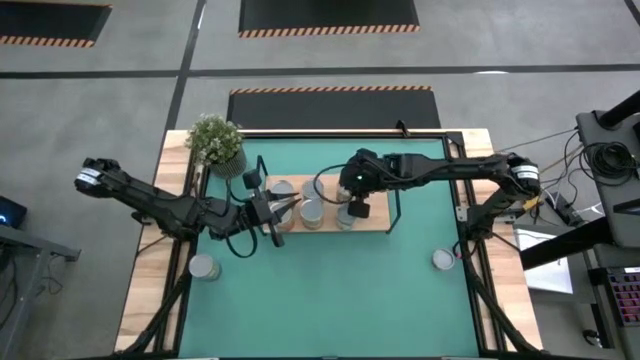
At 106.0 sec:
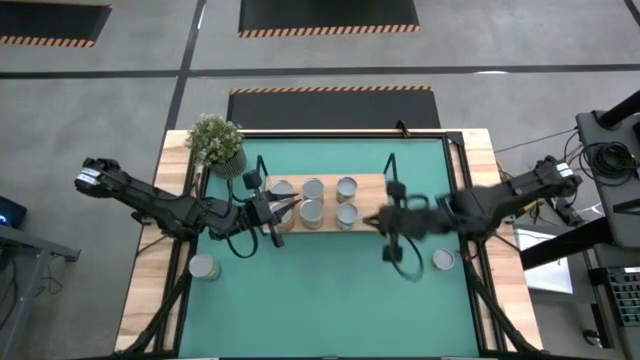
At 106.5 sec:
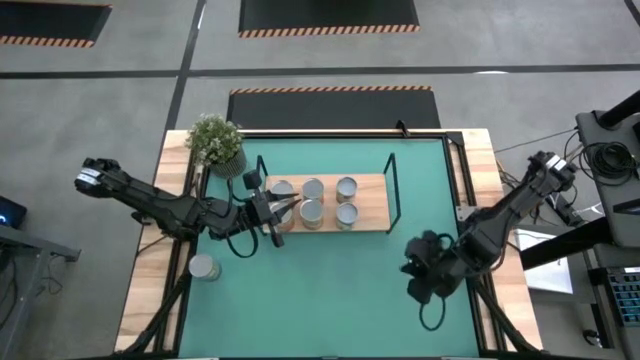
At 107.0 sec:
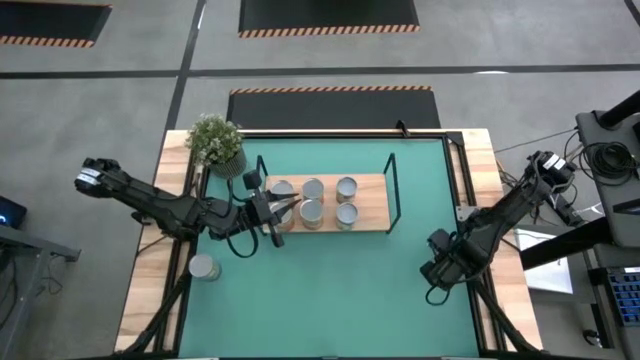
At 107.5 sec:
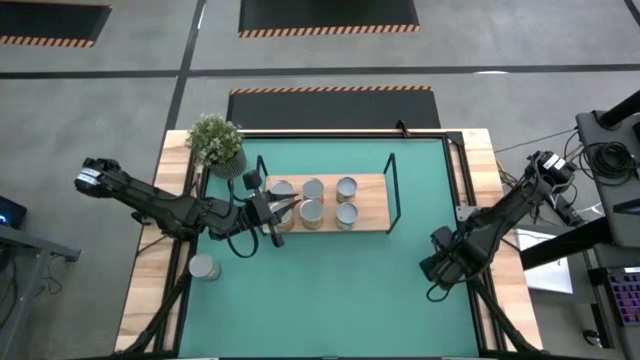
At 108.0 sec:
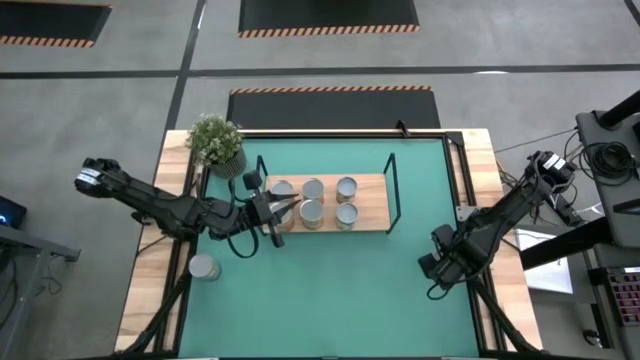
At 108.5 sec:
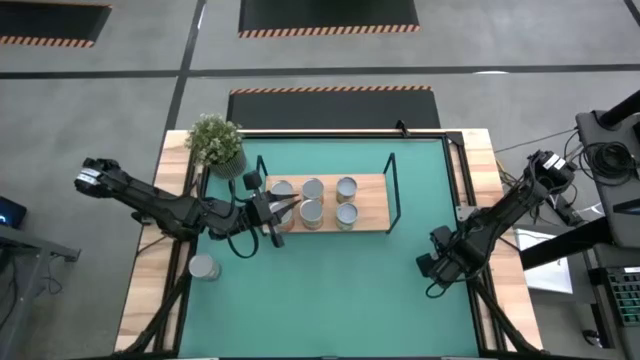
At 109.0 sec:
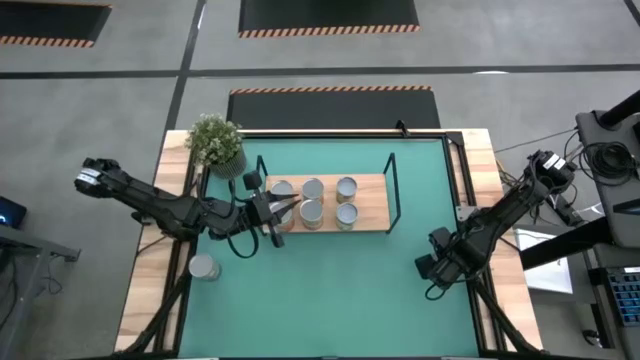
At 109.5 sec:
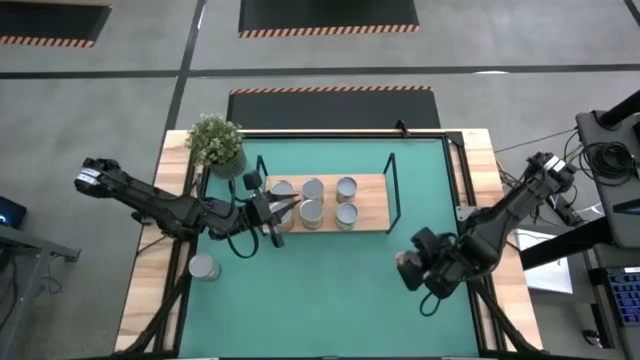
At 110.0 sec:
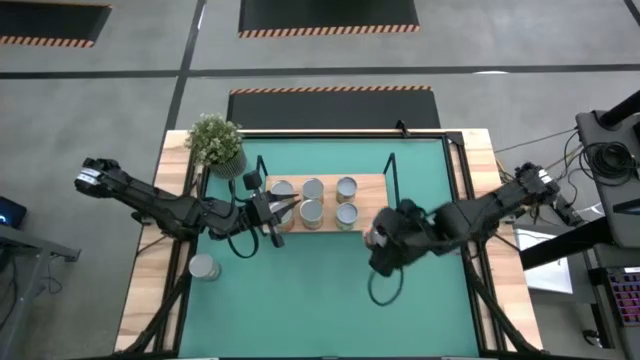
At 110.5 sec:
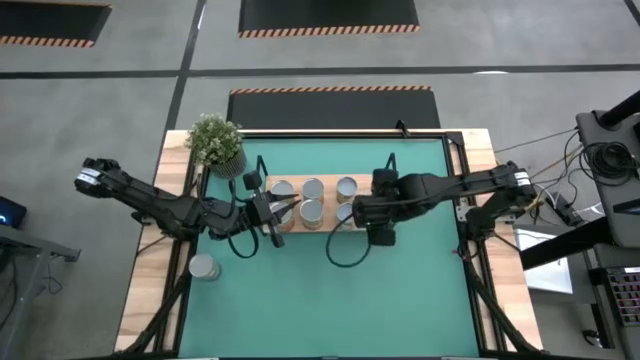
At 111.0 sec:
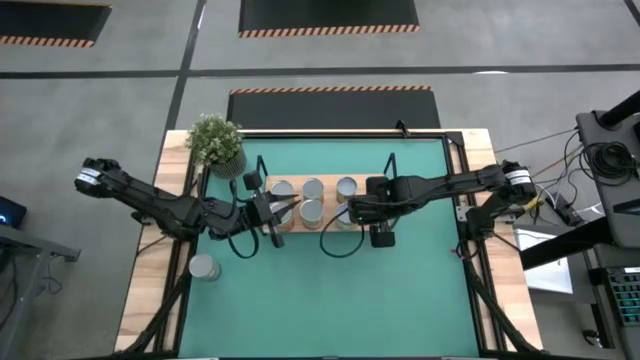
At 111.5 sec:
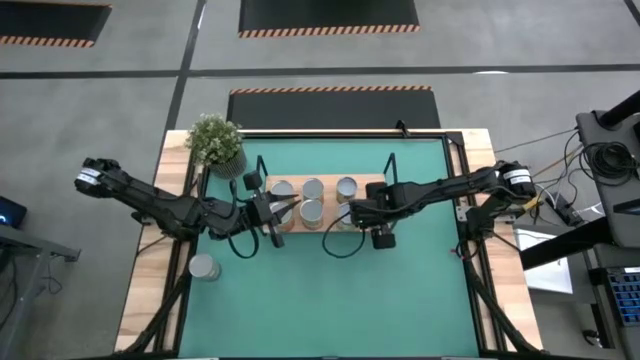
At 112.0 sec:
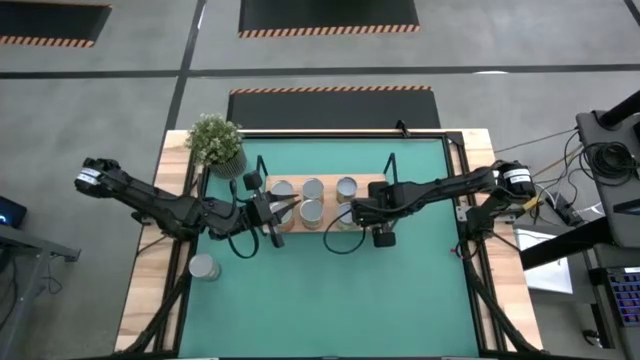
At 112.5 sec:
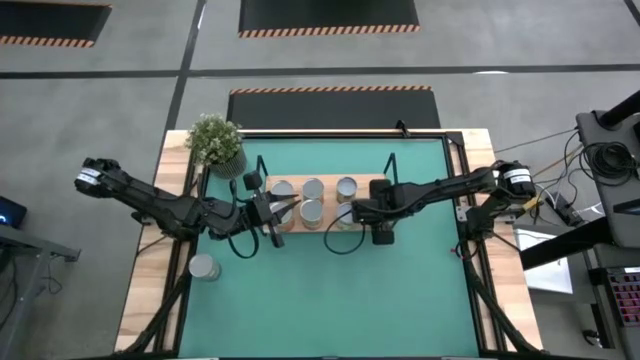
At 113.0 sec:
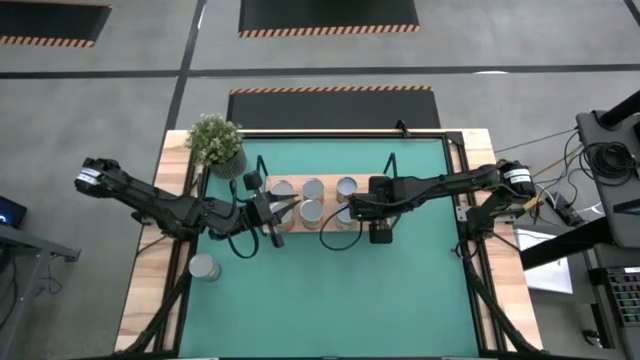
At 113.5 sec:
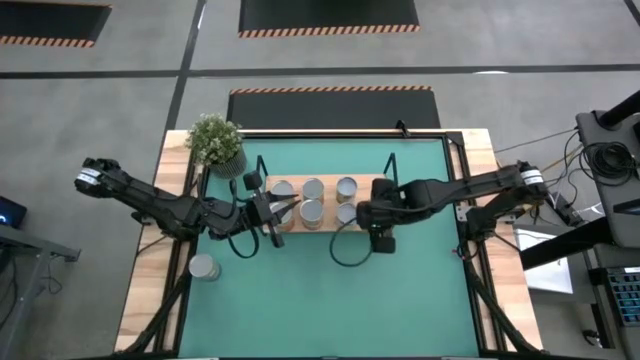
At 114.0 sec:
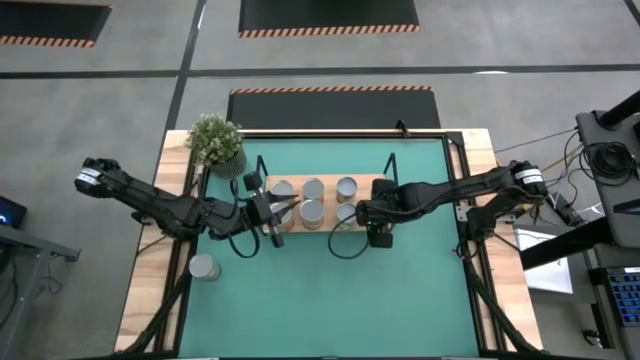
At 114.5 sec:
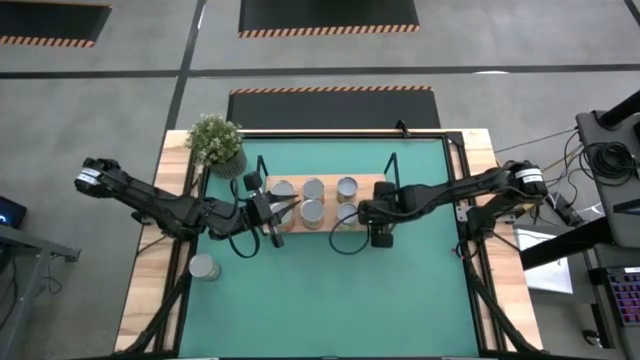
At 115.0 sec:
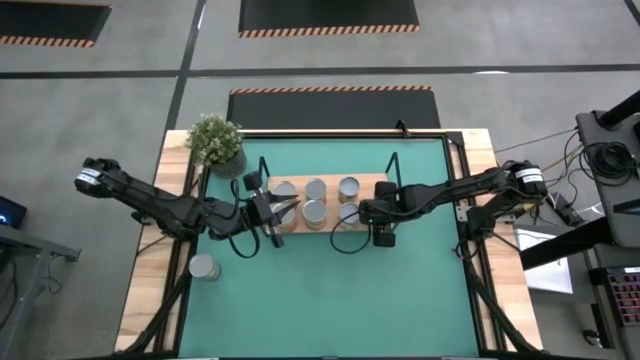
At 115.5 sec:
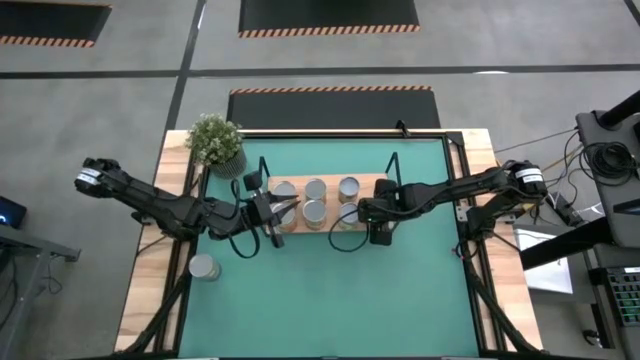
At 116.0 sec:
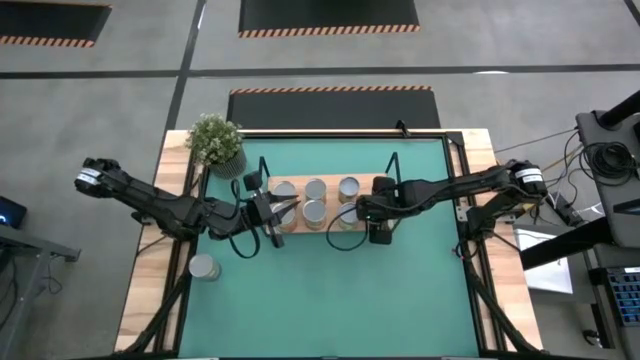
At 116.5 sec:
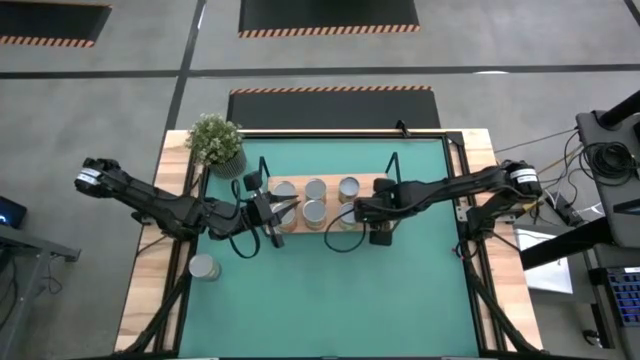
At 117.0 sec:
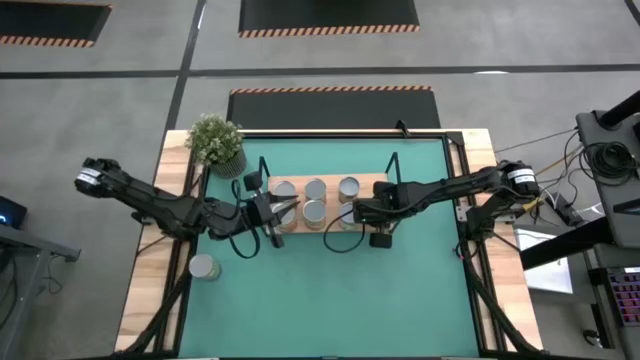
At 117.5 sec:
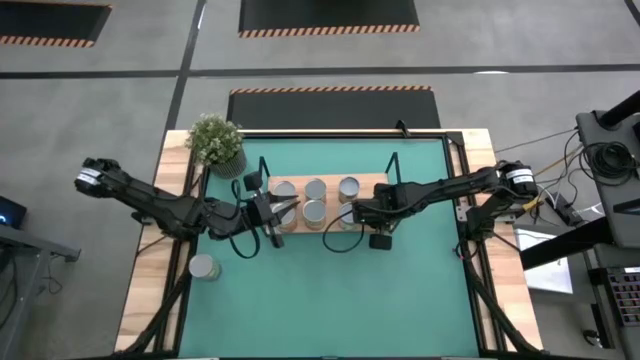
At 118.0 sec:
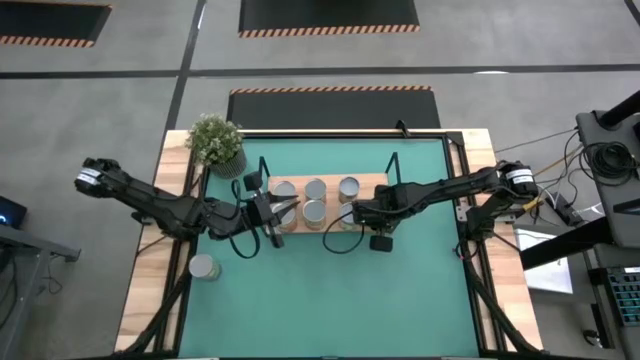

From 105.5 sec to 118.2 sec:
Task: Pick and place cans onto a shelf
Put the canned pineapple rings on the shelf

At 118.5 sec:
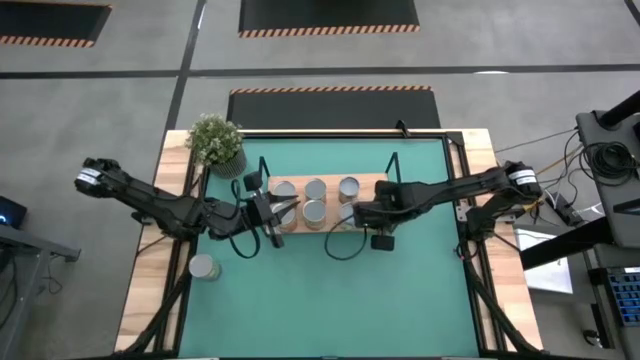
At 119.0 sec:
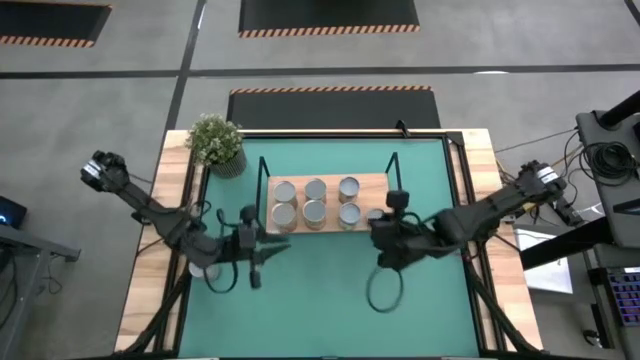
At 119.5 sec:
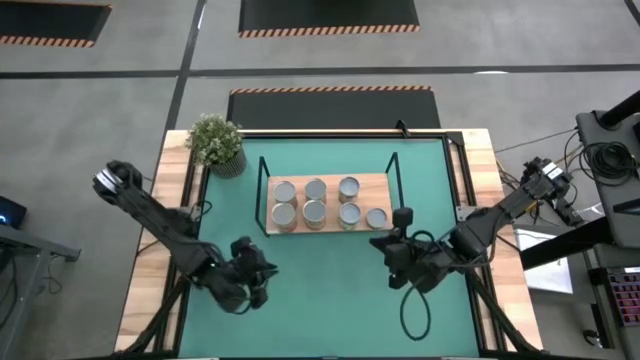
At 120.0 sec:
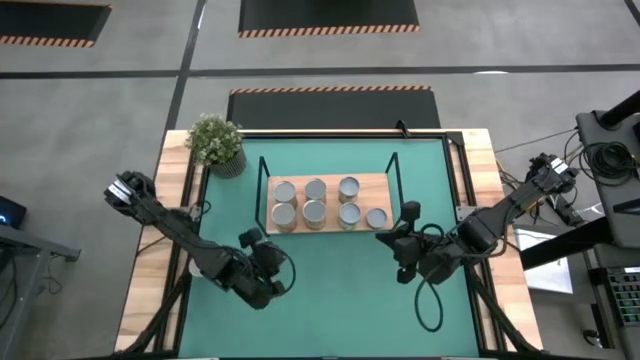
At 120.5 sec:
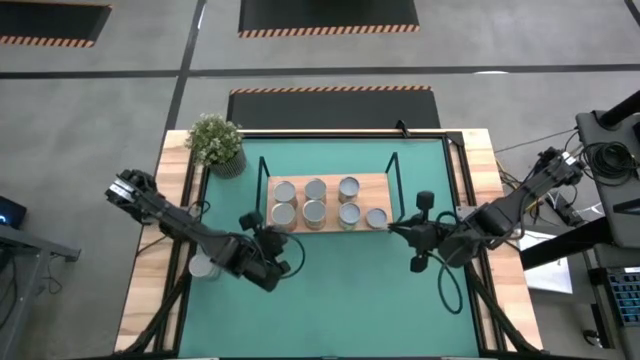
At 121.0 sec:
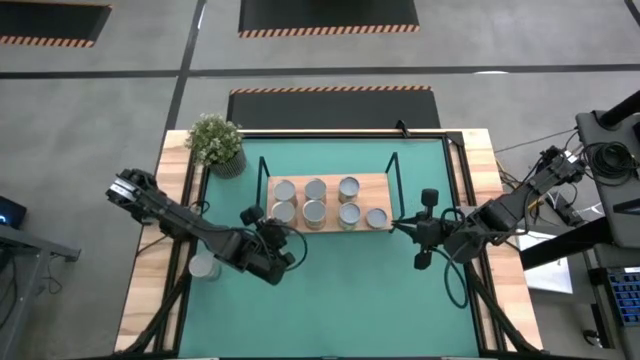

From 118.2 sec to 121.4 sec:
Adjust the cans on the shelf

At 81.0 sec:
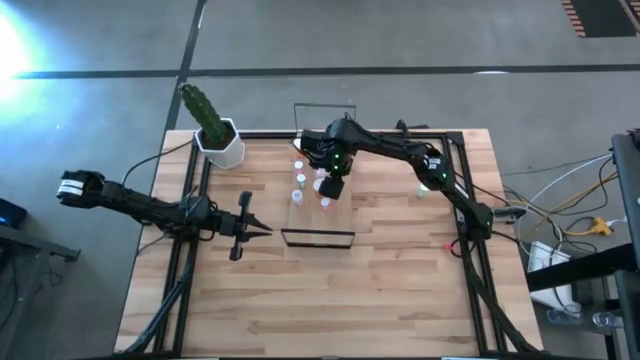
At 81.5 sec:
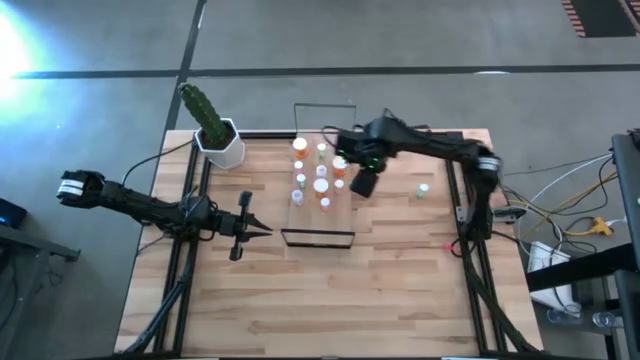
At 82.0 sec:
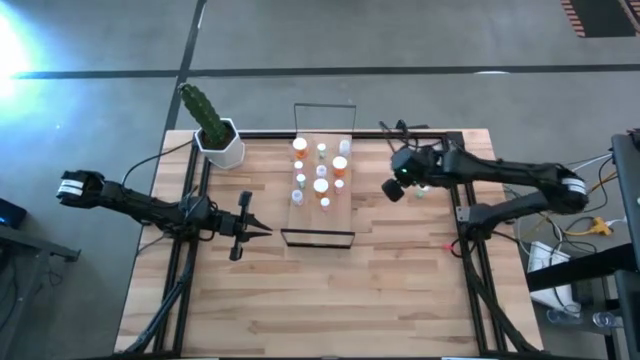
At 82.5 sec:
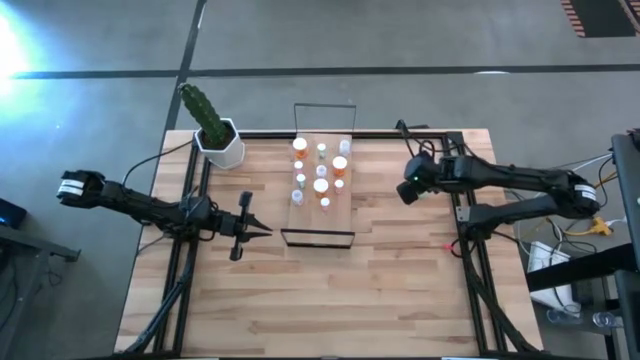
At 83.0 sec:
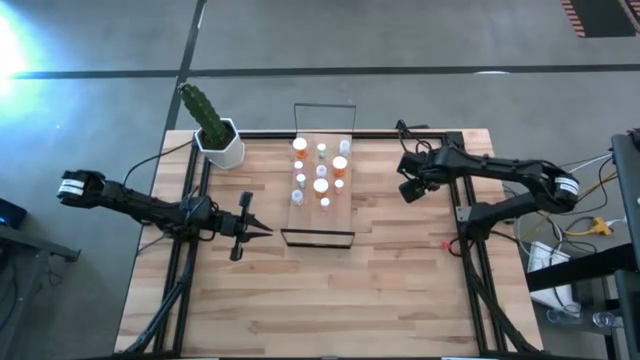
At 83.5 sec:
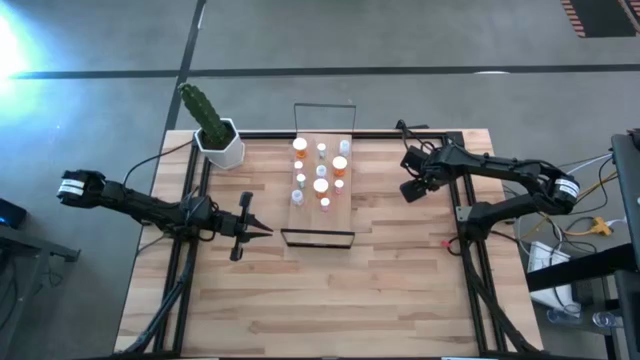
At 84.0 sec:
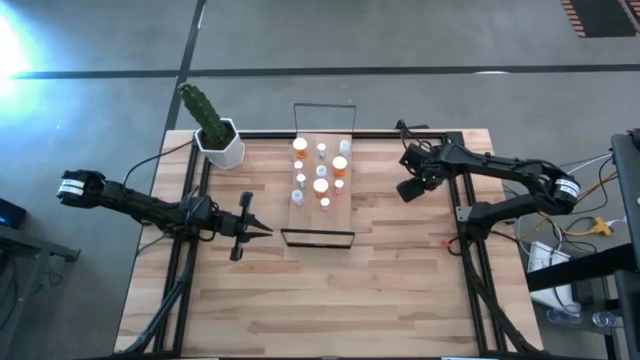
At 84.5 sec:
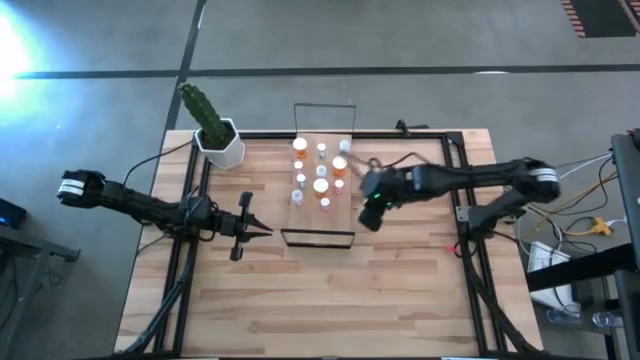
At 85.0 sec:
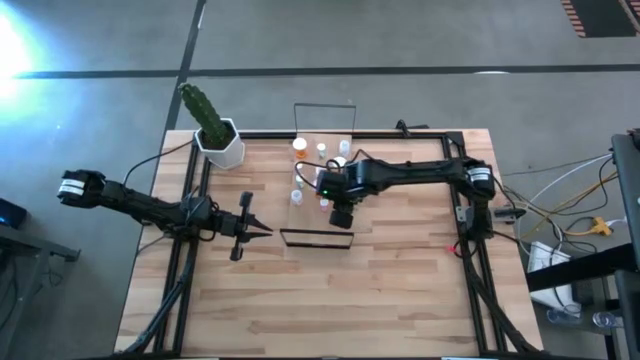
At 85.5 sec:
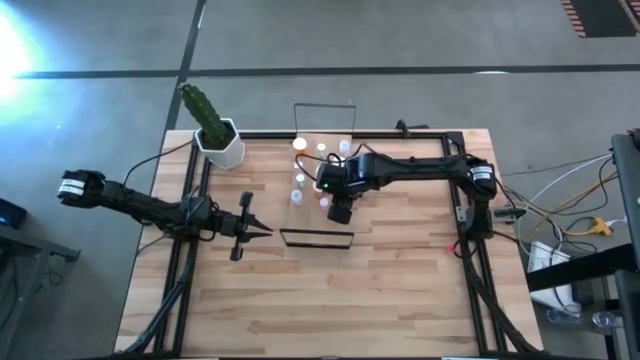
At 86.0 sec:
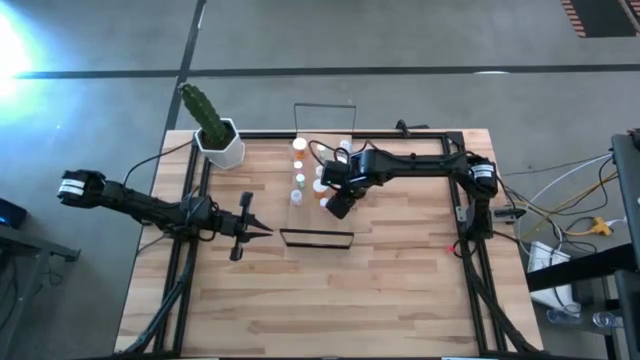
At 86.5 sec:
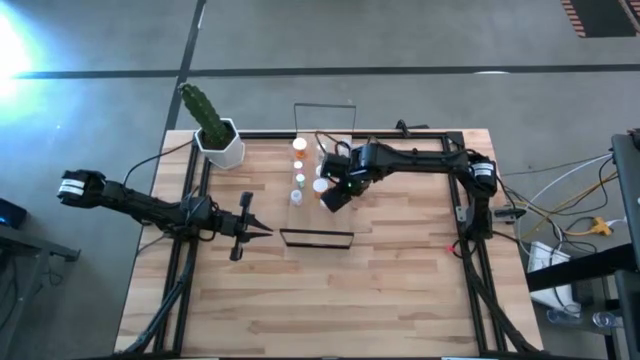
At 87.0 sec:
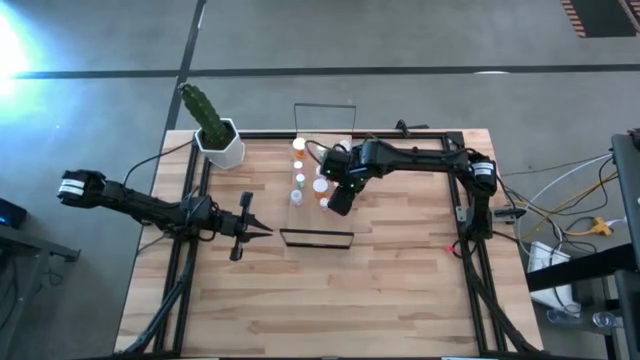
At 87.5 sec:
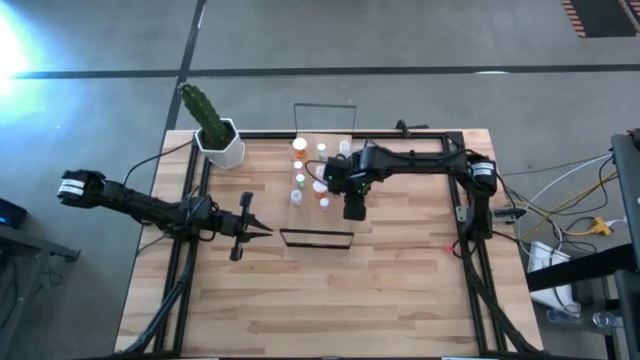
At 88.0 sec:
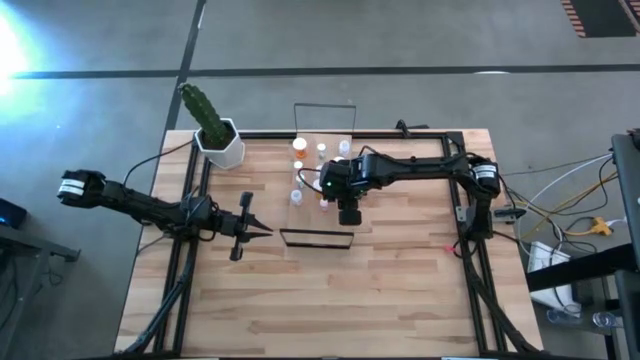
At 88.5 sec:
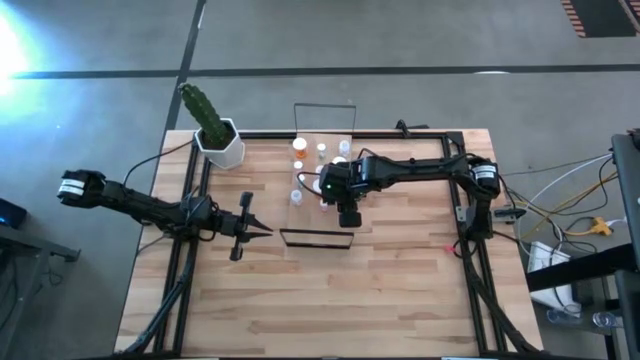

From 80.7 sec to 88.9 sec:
Task: Pick and place medicine bottles onto shelf by color
Put the green transparent pill bottle on the shelf
